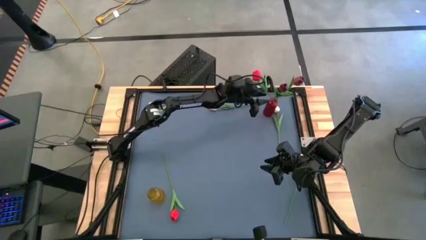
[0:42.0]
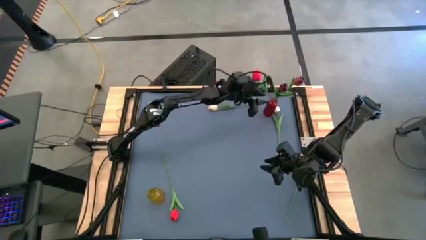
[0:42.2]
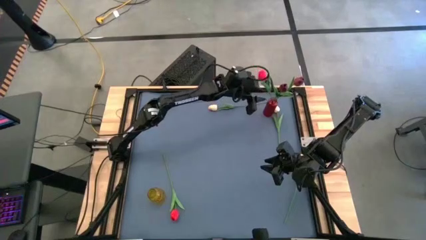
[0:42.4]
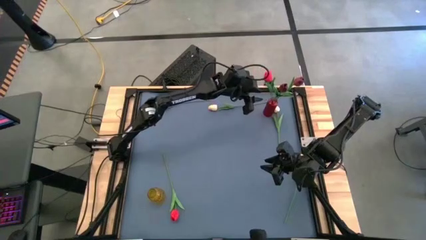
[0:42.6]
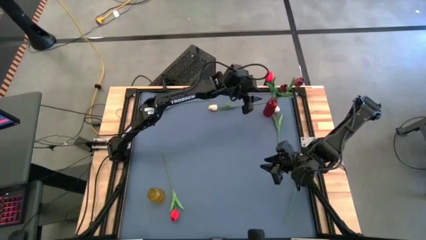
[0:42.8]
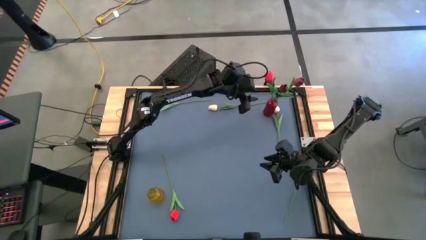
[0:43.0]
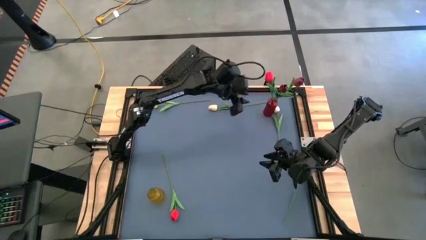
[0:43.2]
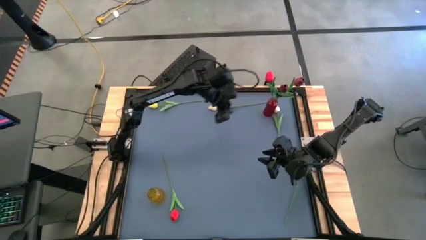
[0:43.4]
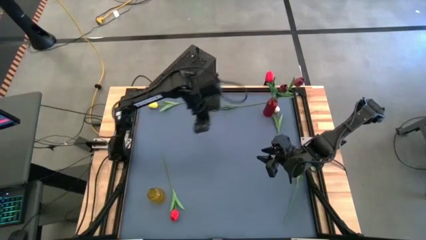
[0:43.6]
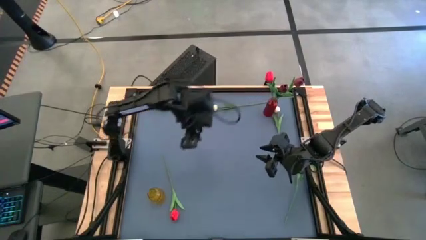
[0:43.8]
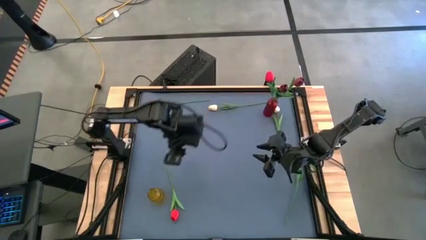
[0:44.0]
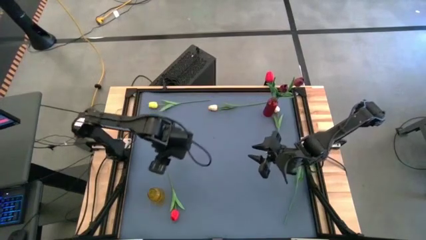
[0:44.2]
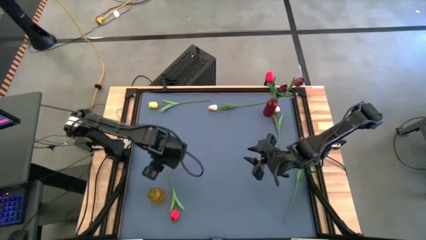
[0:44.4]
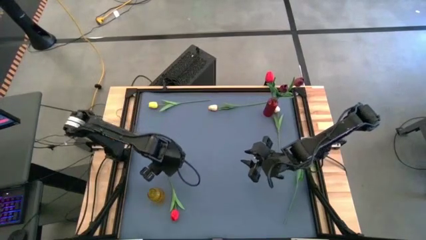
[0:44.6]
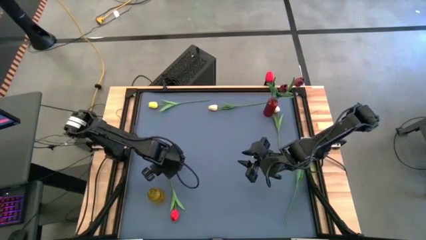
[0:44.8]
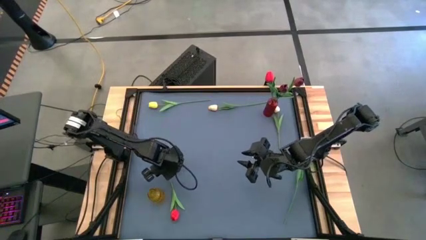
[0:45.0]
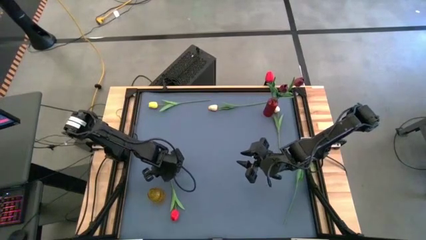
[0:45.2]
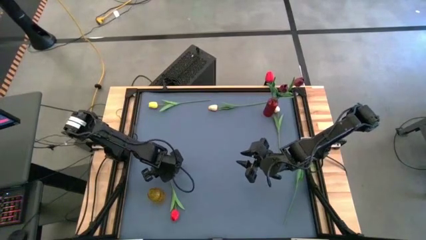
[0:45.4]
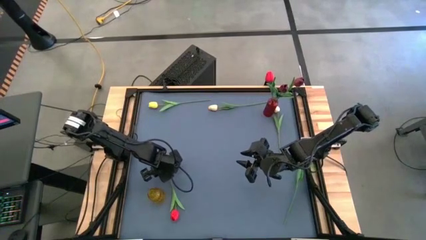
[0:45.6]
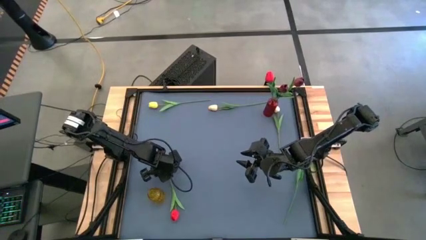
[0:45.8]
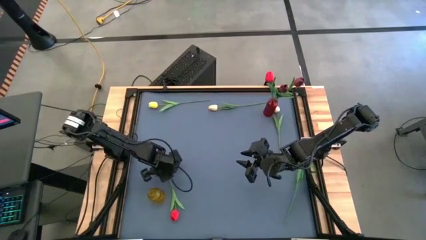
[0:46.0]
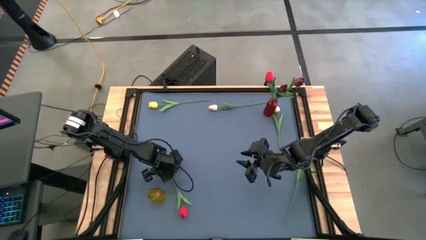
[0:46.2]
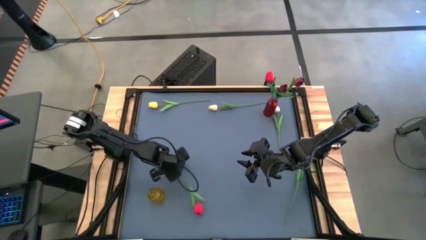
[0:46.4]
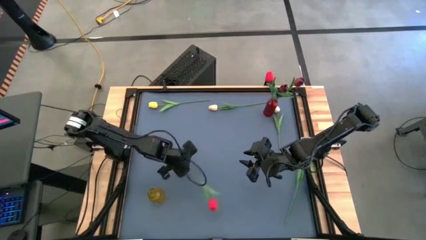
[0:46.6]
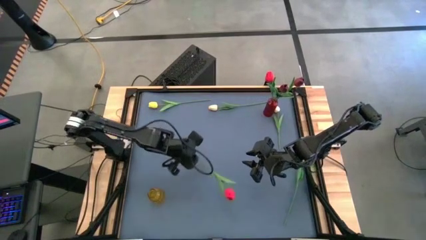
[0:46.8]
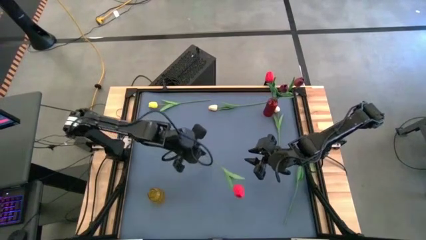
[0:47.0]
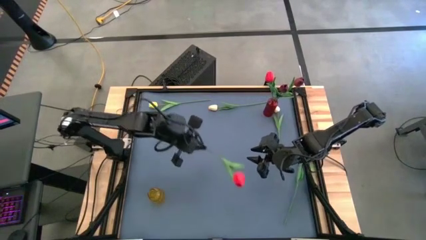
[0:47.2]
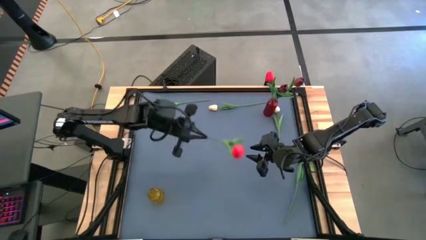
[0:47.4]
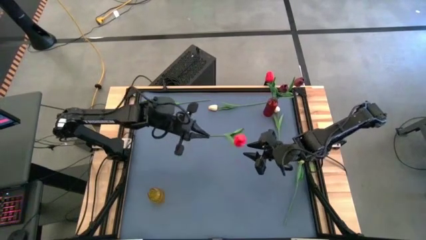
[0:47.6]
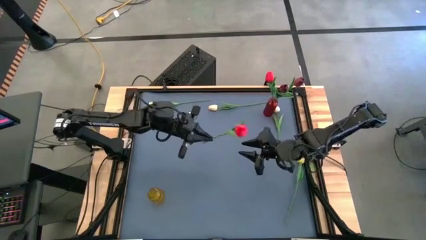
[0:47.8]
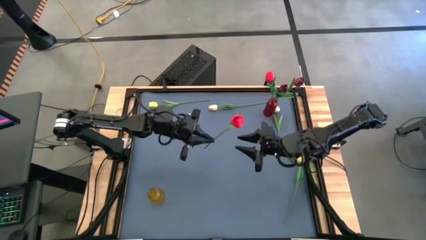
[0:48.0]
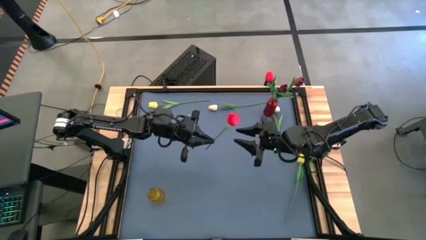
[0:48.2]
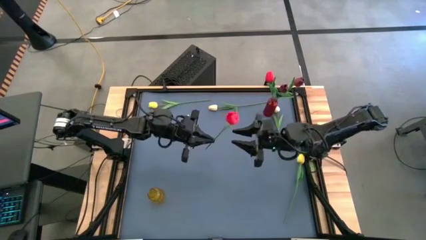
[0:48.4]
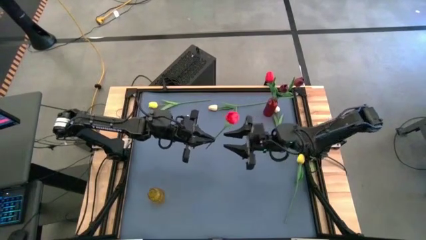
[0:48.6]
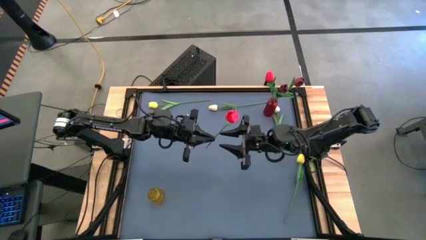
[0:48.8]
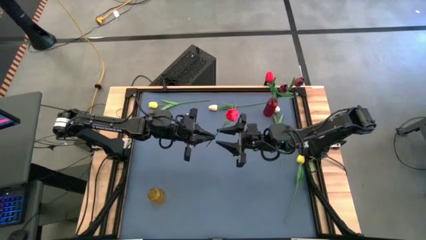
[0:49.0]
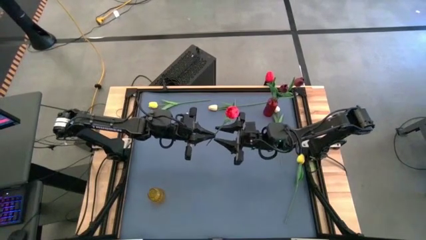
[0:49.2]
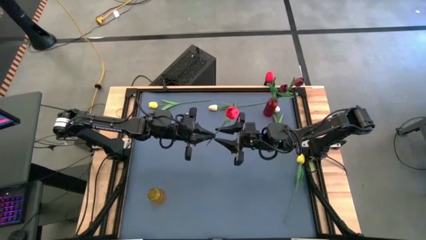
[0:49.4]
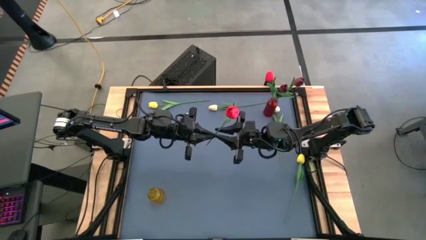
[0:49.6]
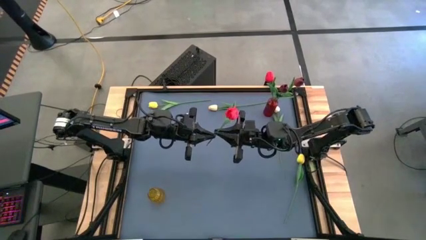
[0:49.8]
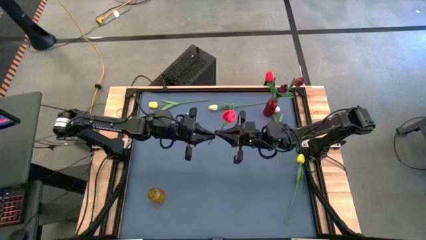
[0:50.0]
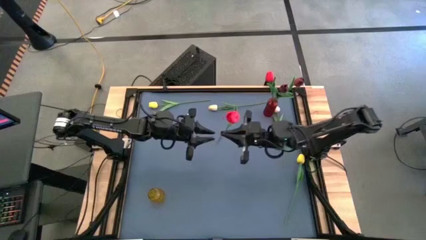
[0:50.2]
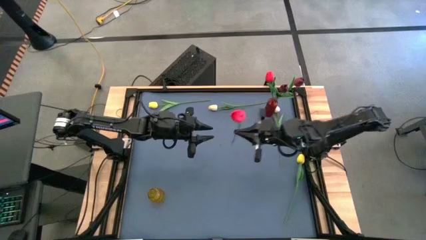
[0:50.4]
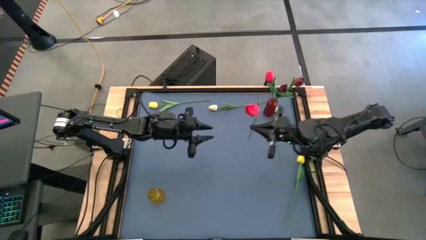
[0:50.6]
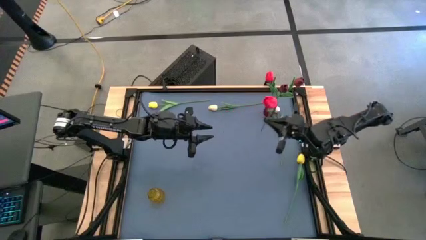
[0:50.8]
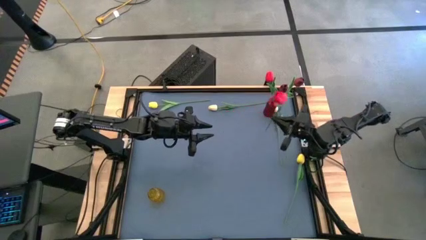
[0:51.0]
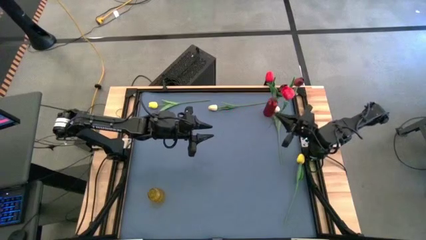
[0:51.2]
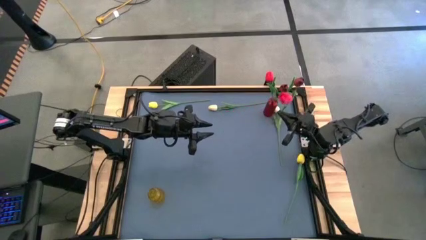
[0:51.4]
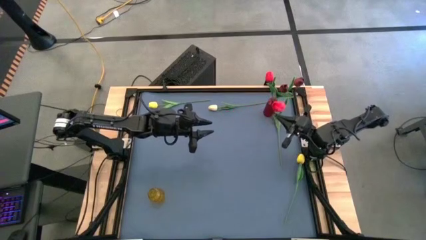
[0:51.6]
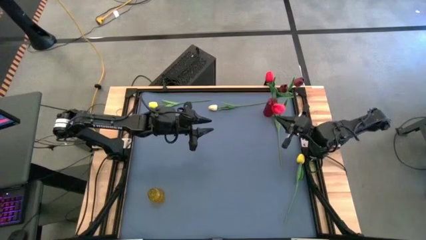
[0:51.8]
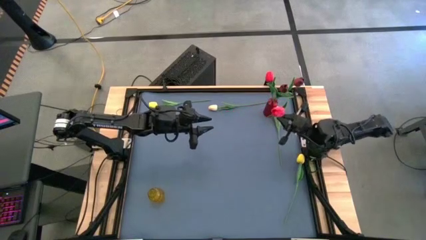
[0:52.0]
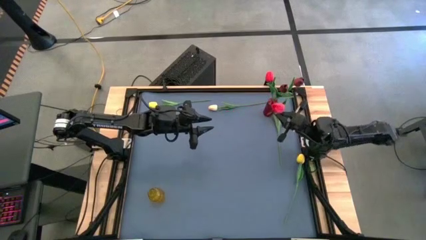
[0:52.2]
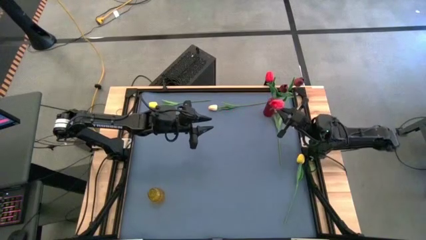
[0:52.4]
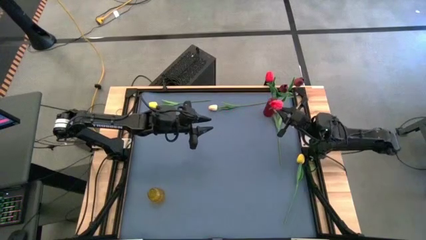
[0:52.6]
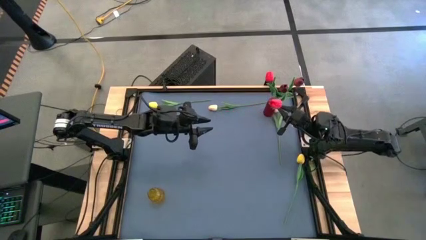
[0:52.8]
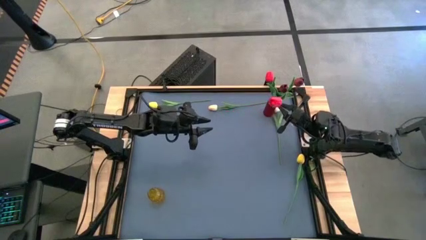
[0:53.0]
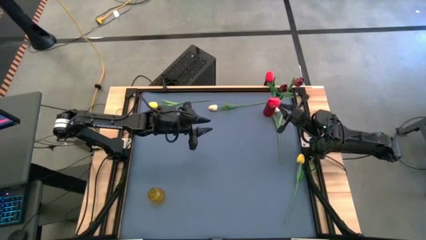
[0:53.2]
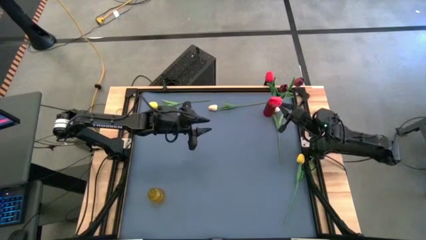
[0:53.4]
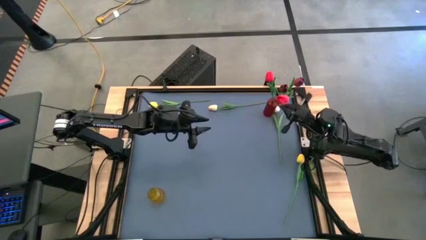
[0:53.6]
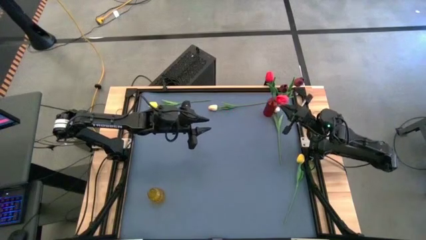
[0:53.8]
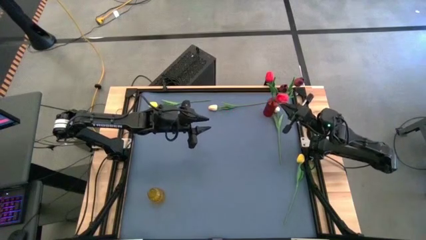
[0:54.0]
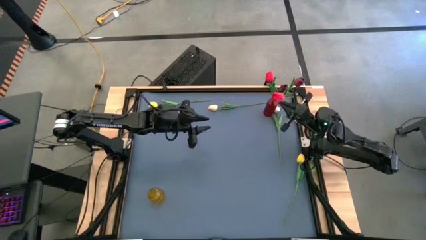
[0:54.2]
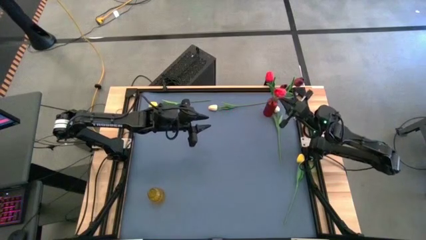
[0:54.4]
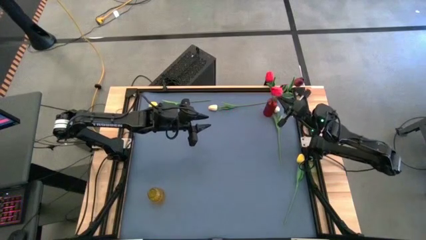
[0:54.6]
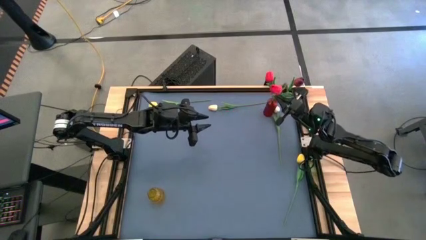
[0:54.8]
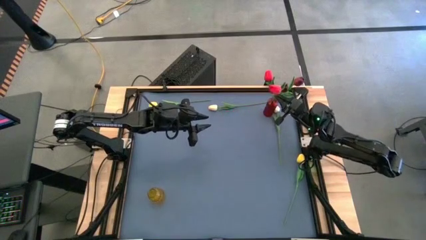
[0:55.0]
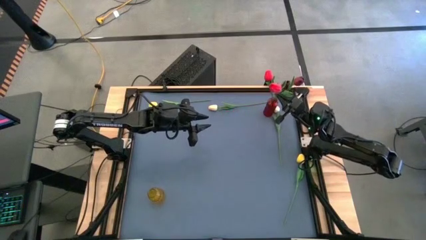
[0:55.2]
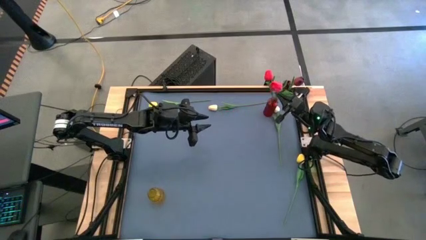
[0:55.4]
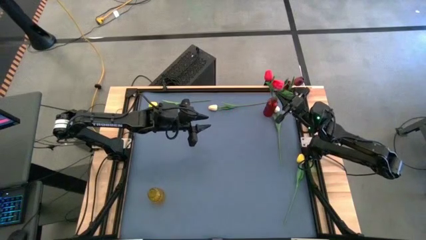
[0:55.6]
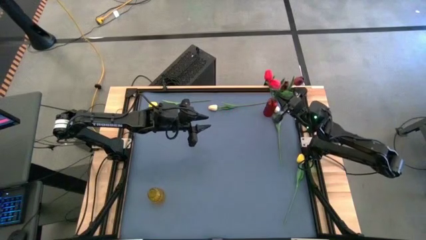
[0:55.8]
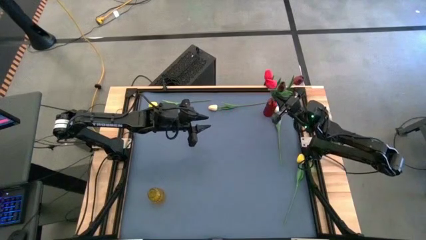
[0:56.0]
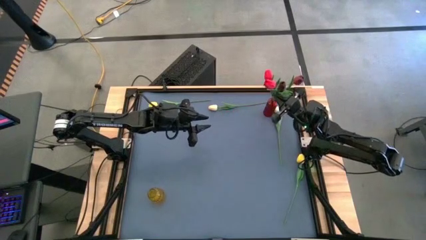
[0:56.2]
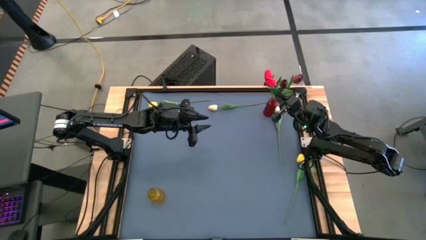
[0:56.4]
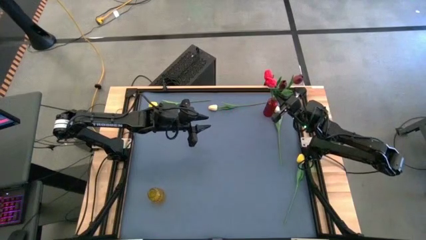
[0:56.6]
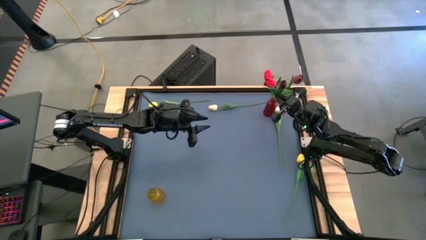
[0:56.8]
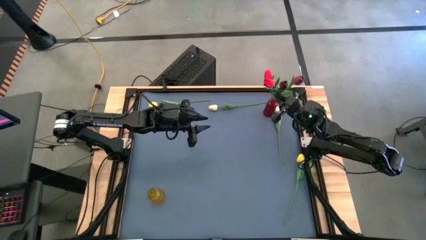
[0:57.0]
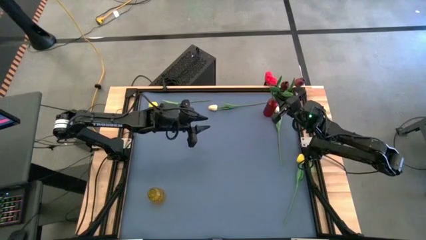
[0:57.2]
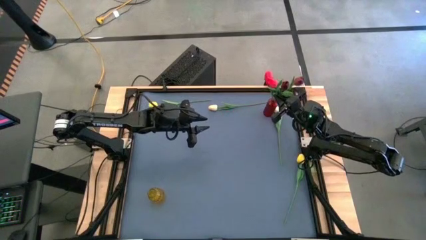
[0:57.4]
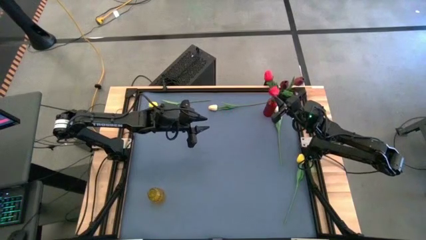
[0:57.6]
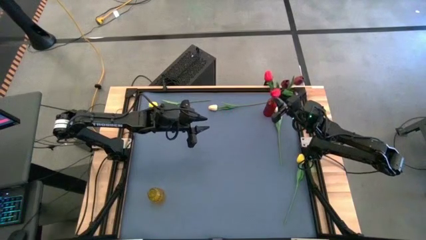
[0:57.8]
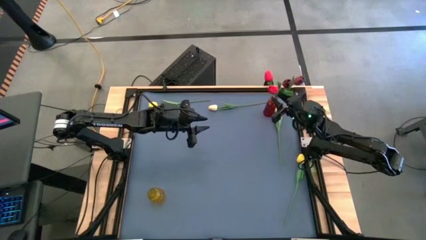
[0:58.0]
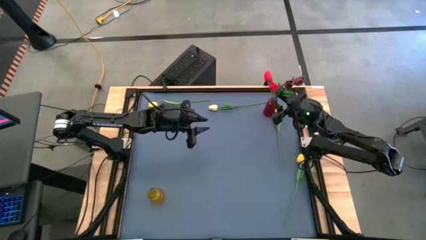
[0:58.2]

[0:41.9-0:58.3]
Task: Sort flowers into vase by color
Put the red flower into the red vase
